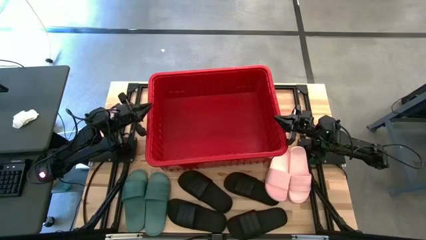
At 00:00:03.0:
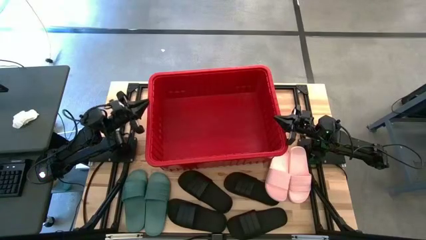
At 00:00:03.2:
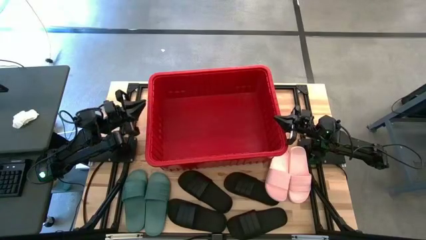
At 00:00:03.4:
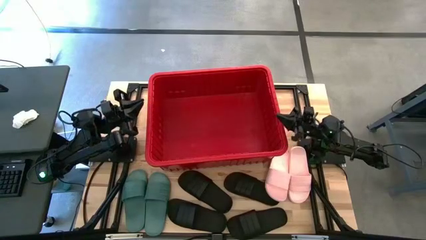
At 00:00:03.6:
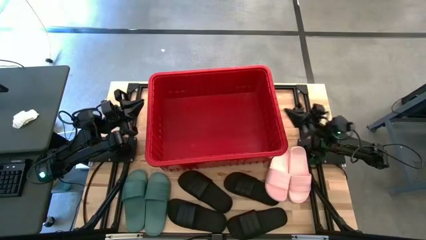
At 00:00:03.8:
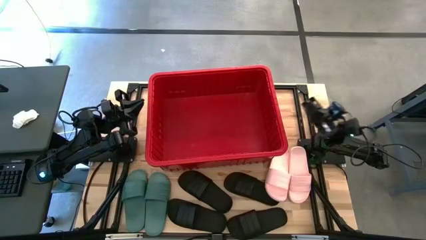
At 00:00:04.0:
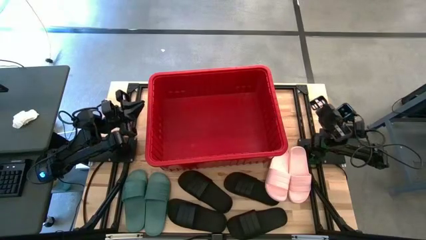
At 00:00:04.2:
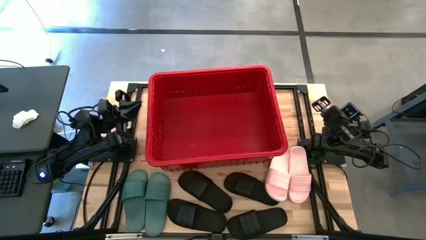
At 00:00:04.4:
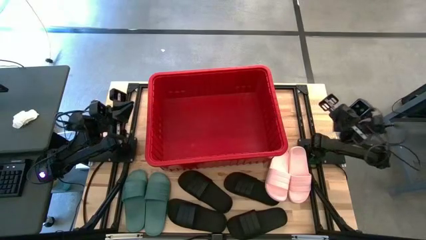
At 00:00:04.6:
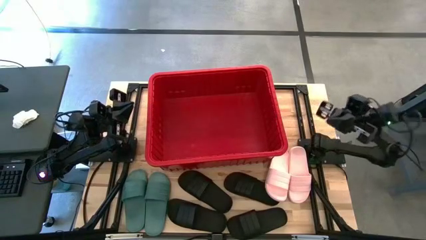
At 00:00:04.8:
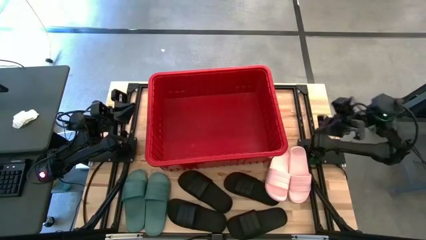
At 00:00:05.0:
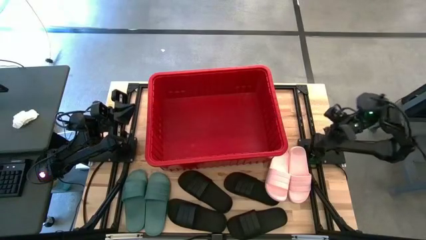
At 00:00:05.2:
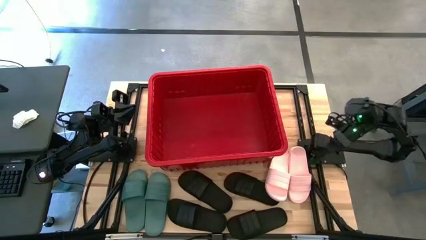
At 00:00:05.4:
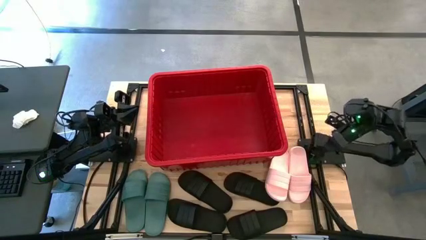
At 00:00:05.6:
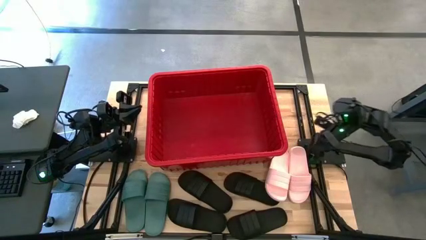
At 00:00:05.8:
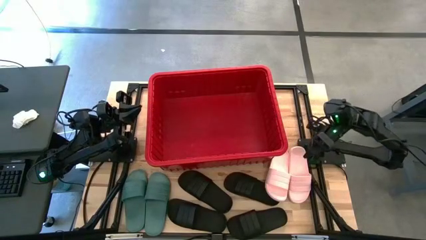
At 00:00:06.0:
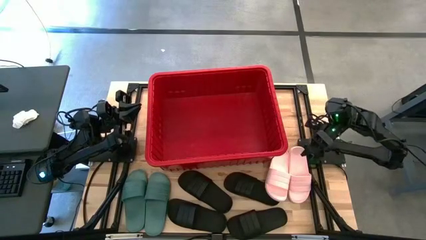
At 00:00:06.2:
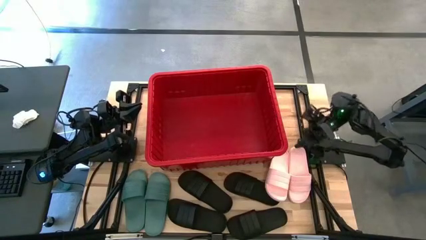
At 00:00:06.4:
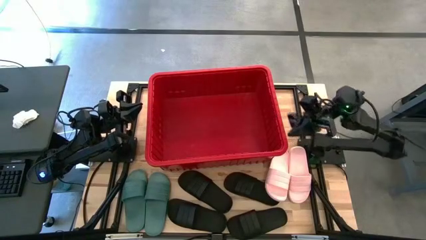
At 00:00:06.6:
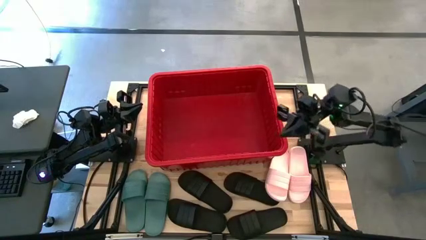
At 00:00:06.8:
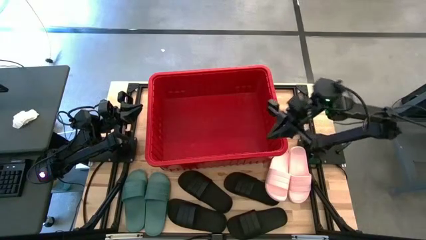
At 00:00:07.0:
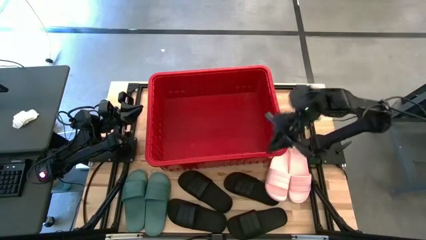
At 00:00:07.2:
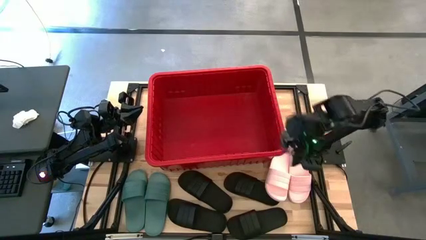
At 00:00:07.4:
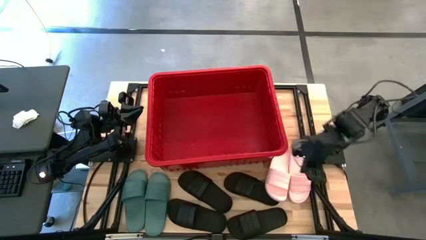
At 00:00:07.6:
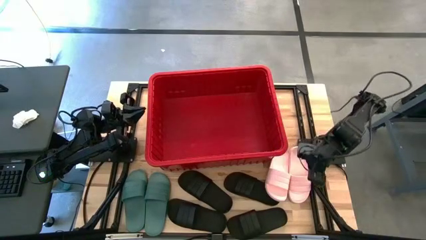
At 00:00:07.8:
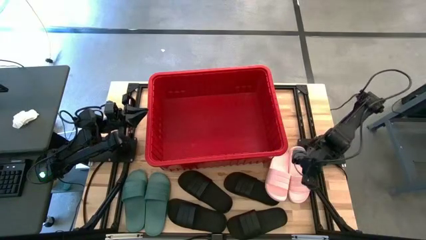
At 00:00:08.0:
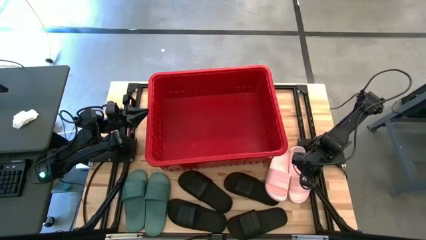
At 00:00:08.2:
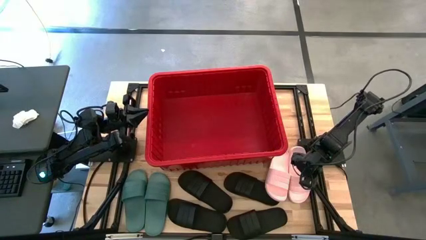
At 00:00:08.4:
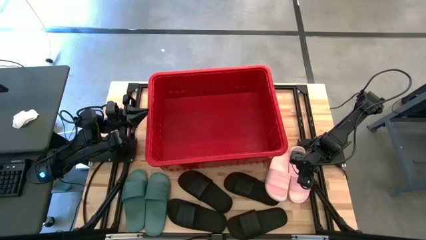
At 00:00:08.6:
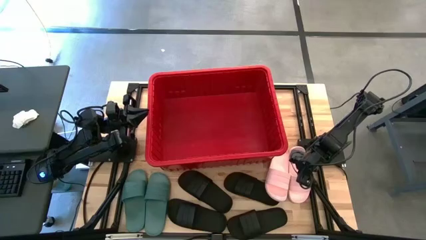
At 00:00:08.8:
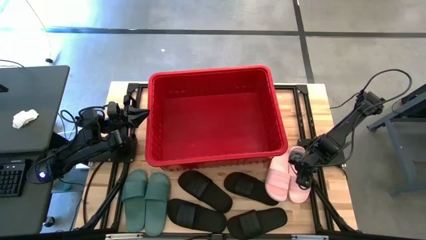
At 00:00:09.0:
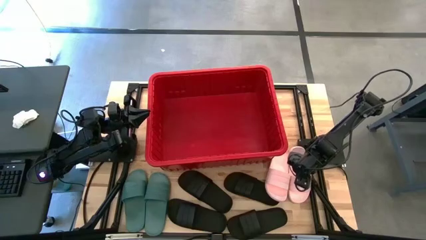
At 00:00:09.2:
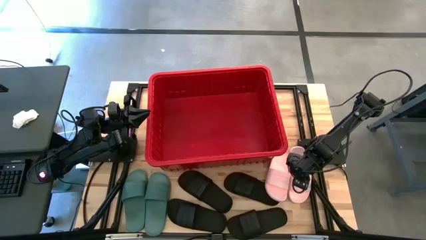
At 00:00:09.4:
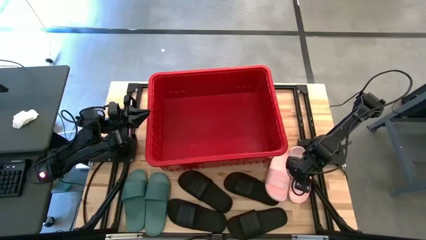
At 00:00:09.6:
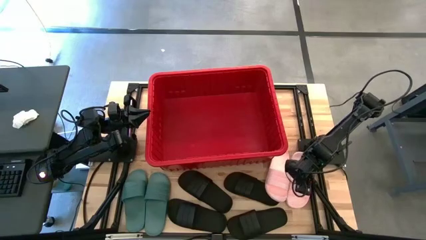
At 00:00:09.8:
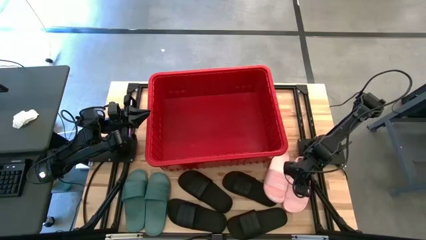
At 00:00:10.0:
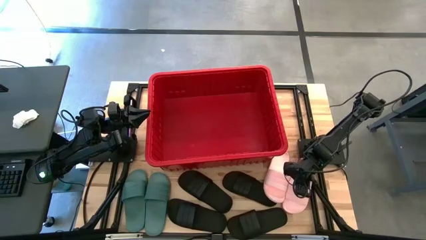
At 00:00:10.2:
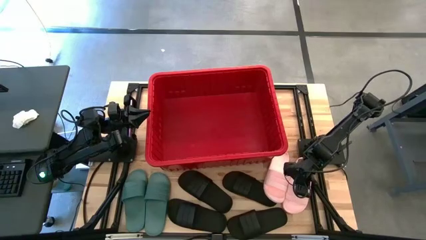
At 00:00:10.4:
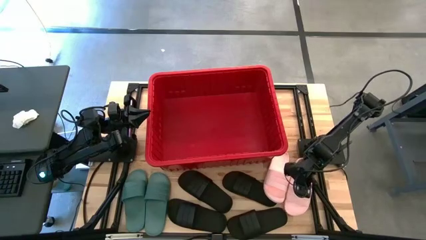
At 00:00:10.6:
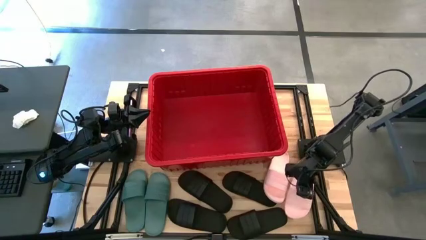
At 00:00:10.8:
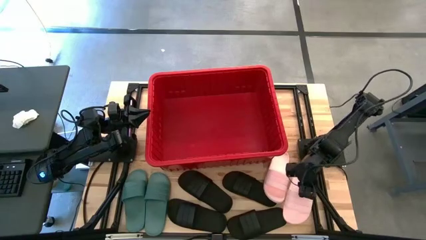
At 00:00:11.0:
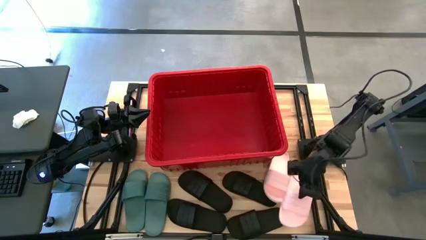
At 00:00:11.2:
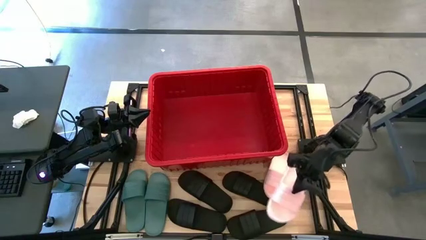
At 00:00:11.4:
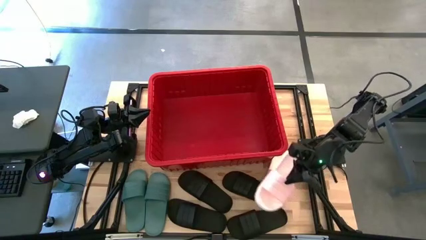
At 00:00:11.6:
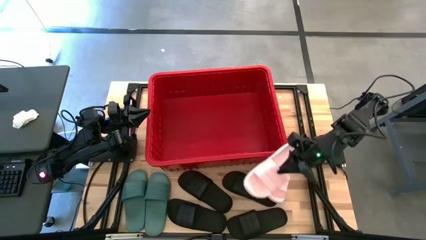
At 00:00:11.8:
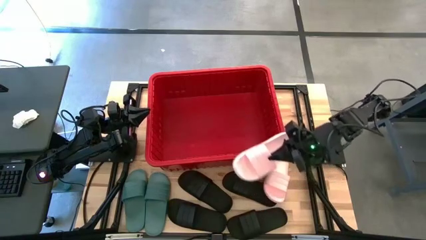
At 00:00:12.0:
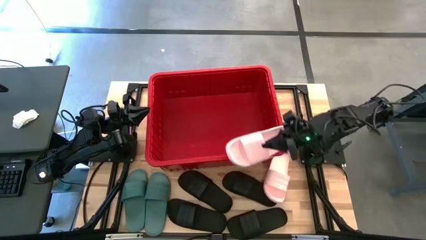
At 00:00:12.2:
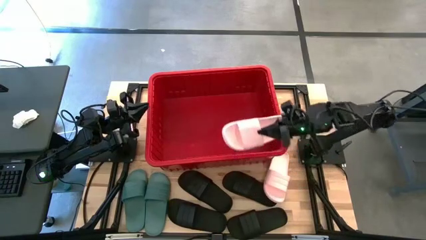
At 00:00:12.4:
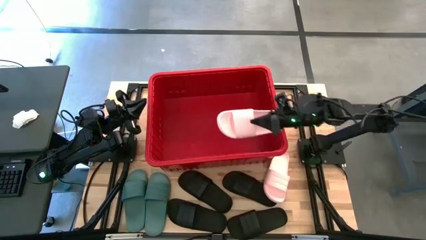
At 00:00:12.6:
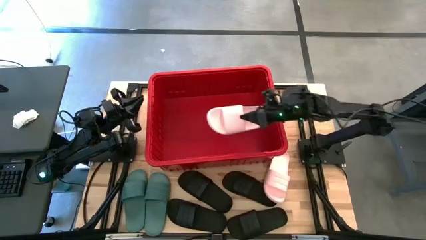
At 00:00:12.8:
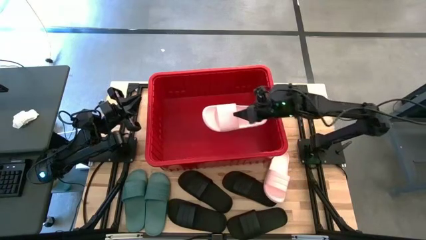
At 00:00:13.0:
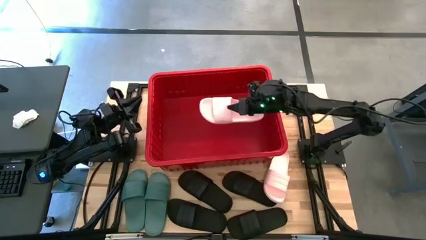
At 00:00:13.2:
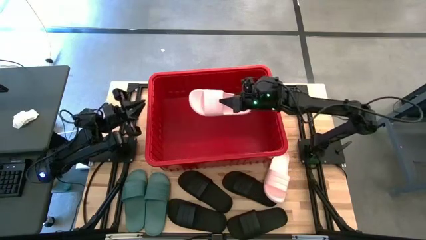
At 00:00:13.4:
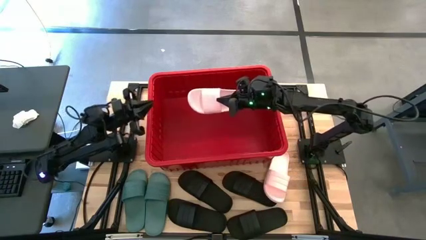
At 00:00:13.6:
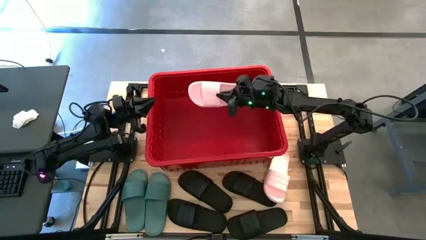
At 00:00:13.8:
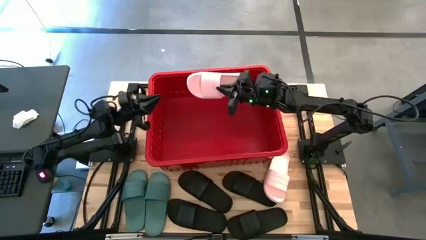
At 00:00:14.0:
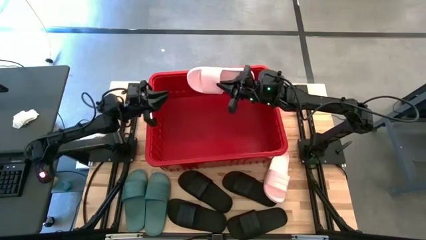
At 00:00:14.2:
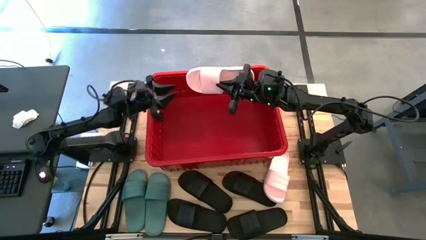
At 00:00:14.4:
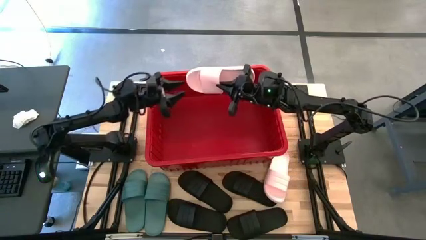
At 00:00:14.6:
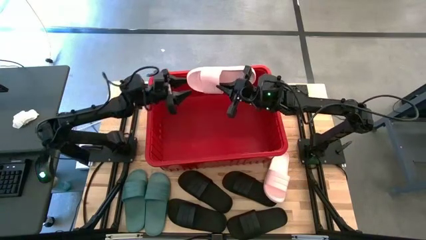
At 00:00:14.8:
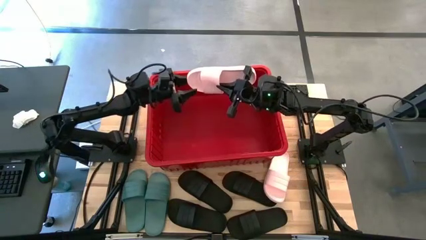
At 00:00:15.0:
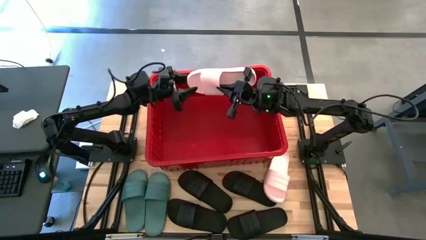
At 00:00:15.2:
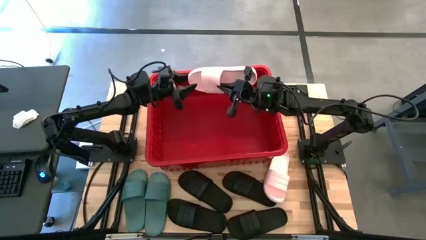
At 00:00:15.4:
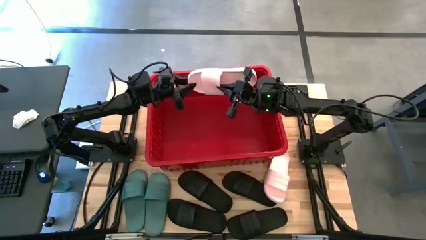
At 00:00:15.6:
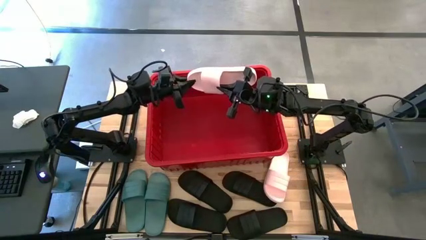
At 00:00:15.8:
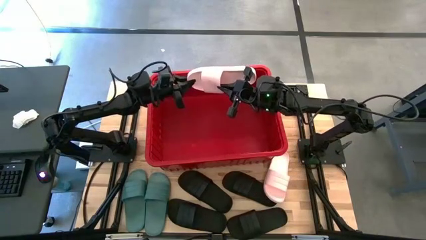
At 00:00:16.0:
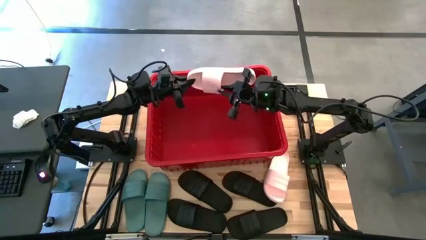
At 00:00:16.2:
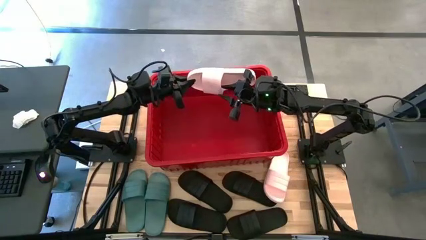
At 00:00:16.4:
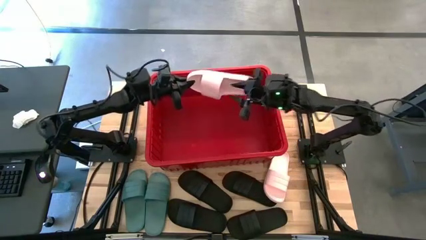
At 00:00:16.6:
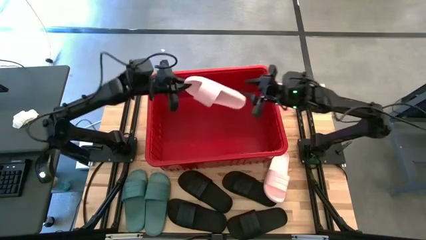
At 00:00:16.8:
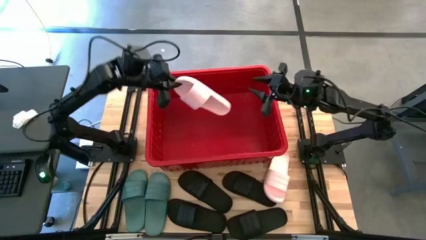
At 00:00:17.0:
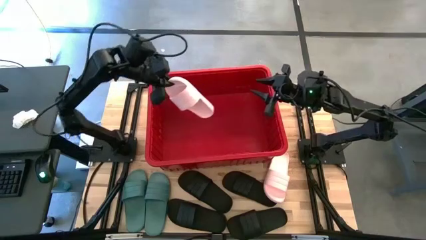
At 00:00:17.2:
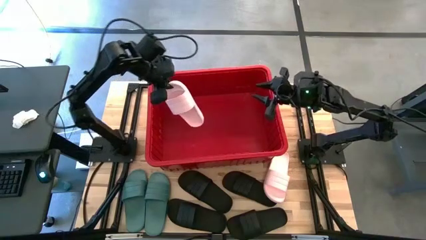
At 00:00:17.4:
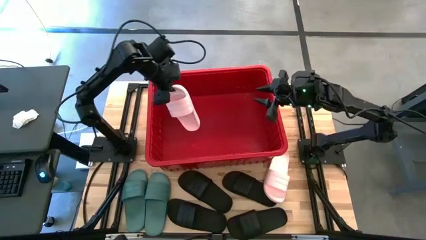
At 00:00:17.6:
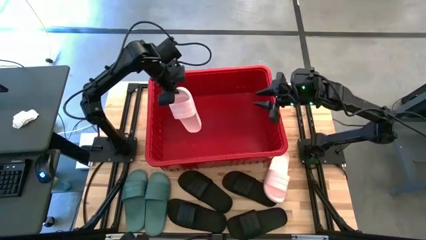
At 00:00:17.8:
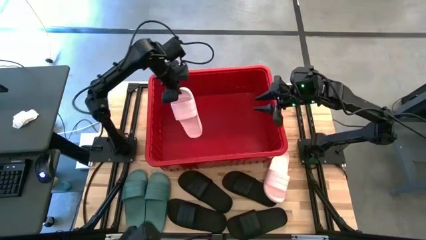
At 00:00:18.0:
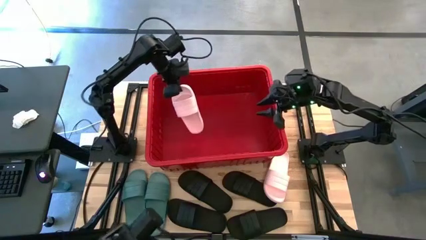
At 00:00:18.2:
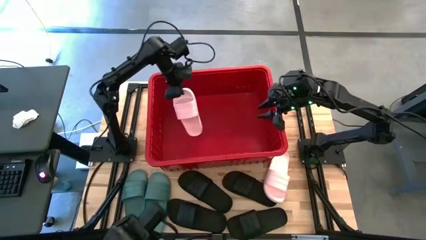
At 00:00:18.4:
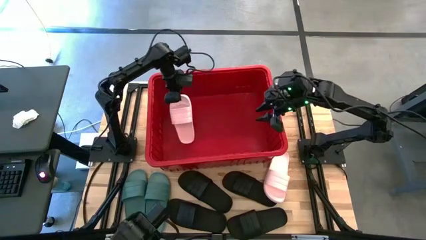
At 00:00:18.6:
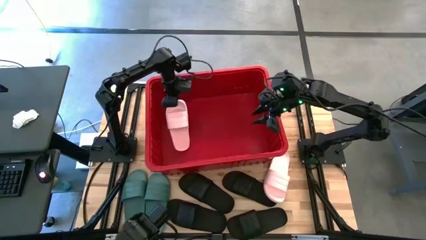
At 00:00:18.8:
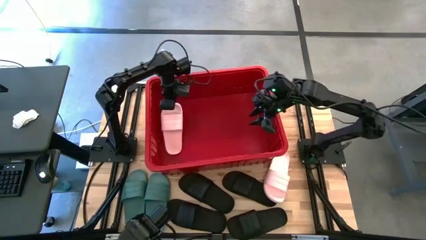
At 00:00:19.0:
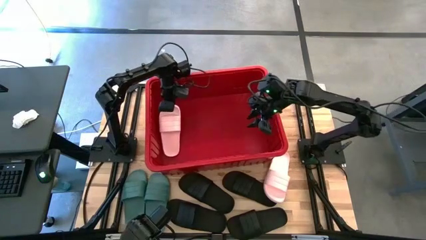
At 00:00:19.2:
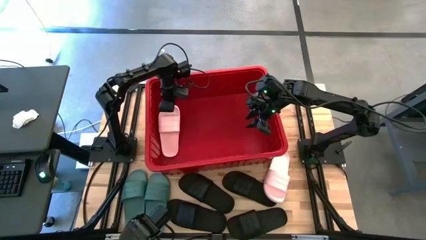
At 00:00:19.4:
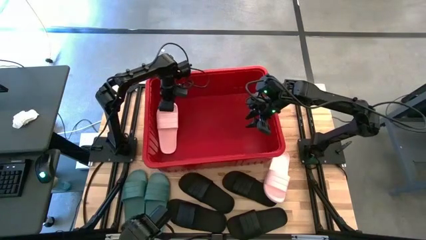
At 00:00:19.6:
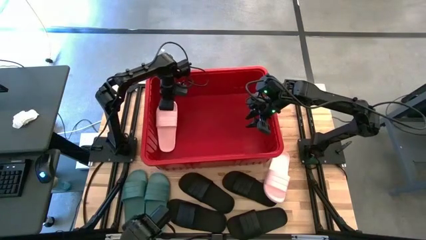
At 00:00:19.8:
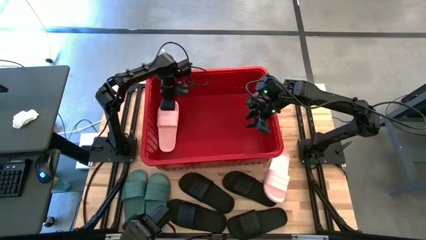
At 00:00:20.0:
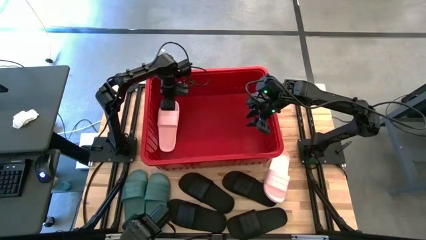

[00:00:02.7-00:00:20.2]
Task: Pick and place slides into bin
Put the pink slide into the red bin
